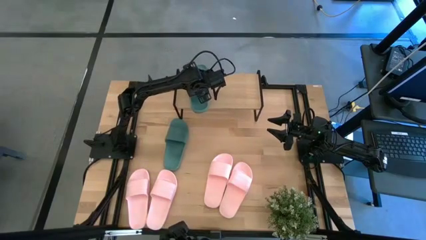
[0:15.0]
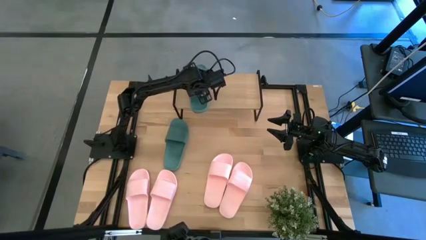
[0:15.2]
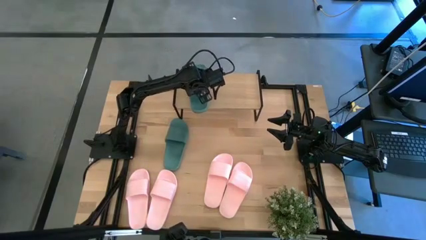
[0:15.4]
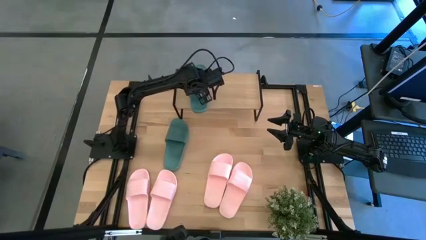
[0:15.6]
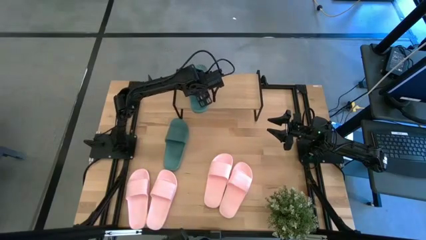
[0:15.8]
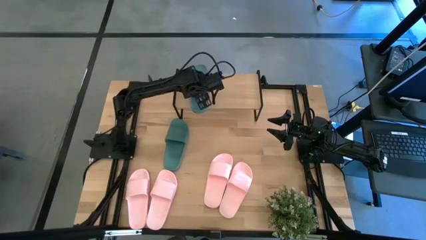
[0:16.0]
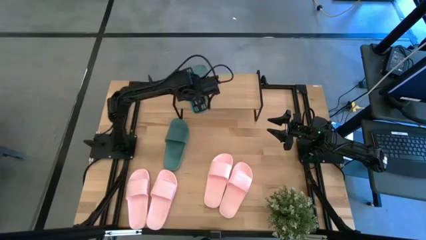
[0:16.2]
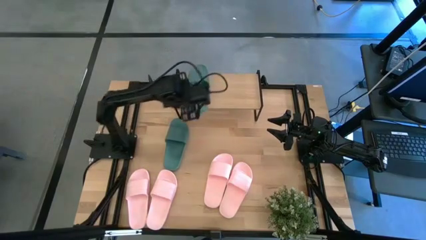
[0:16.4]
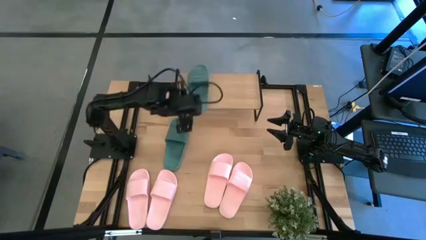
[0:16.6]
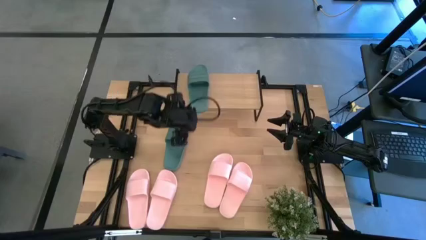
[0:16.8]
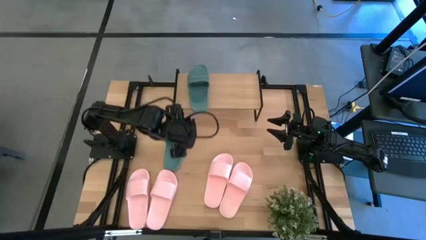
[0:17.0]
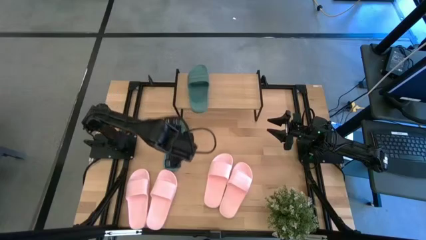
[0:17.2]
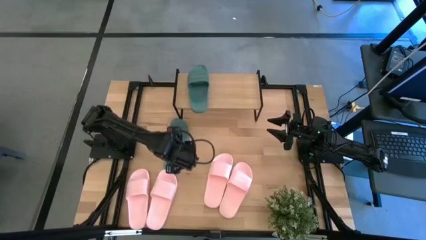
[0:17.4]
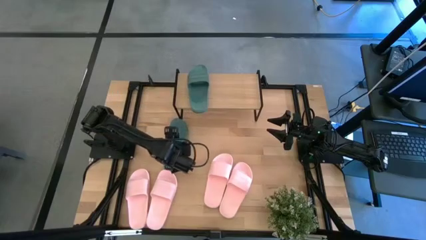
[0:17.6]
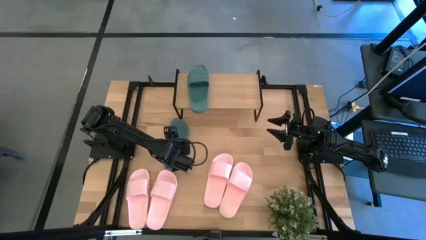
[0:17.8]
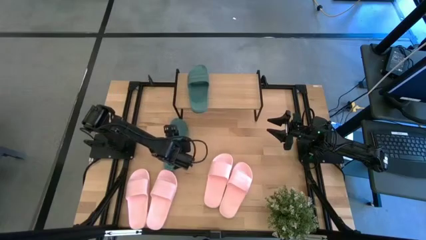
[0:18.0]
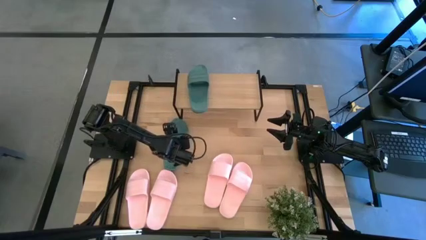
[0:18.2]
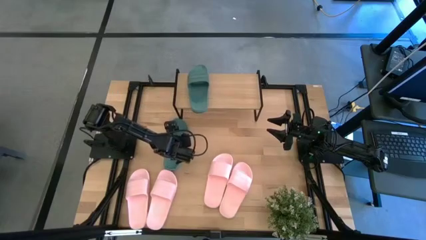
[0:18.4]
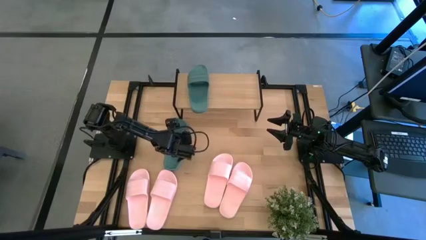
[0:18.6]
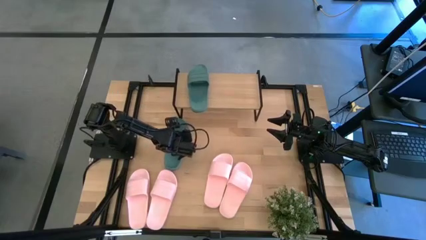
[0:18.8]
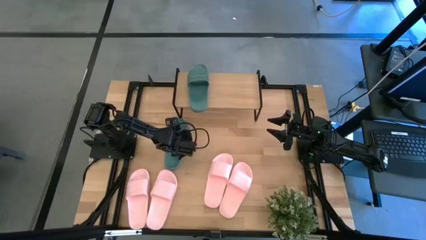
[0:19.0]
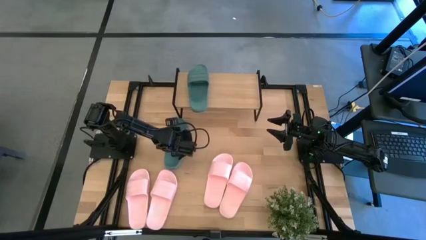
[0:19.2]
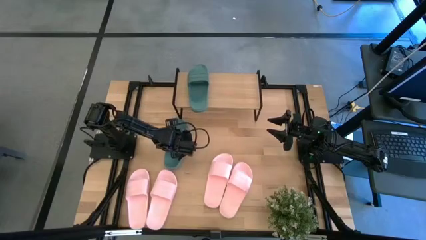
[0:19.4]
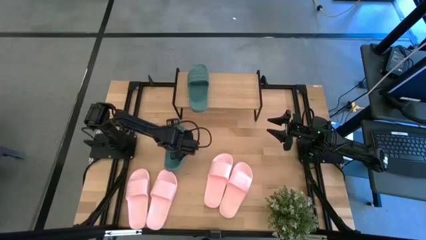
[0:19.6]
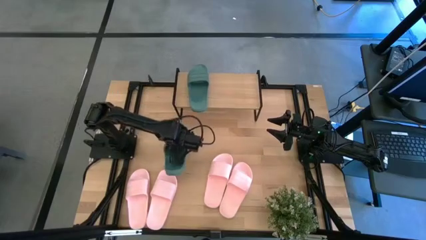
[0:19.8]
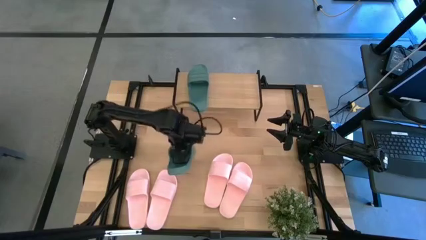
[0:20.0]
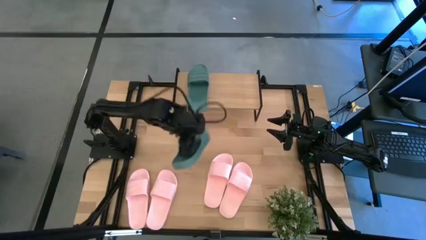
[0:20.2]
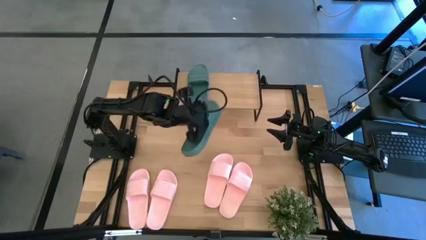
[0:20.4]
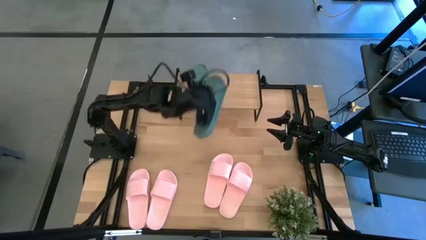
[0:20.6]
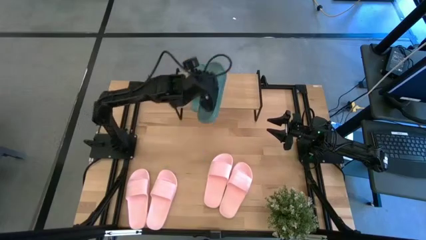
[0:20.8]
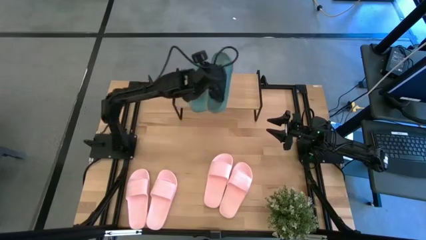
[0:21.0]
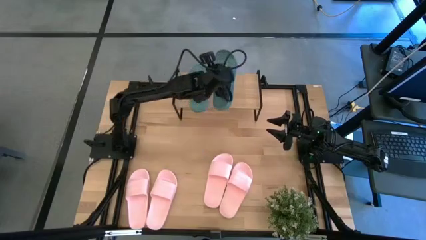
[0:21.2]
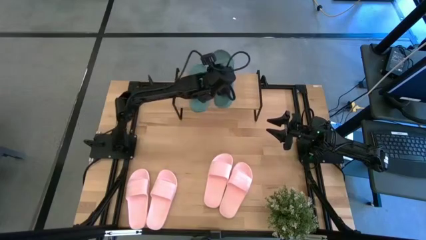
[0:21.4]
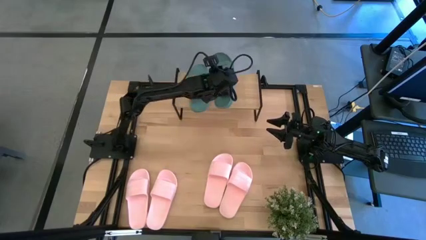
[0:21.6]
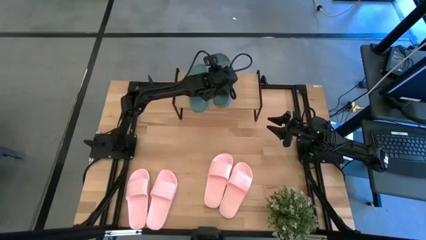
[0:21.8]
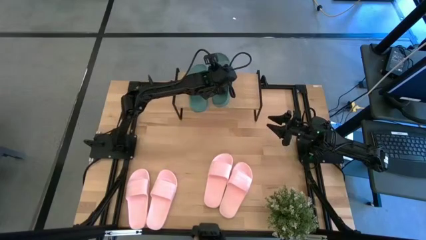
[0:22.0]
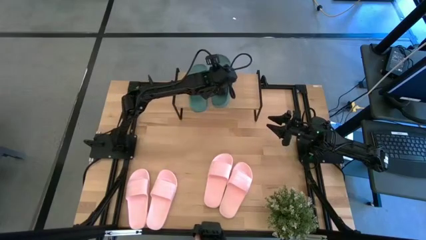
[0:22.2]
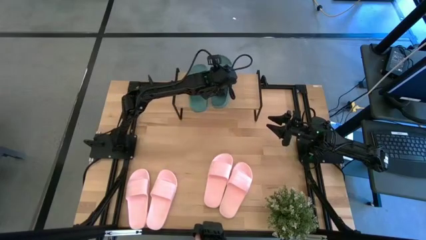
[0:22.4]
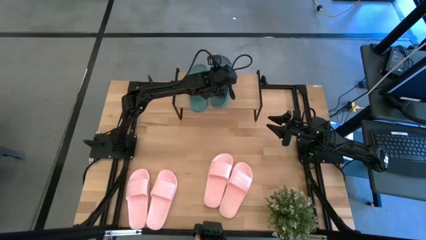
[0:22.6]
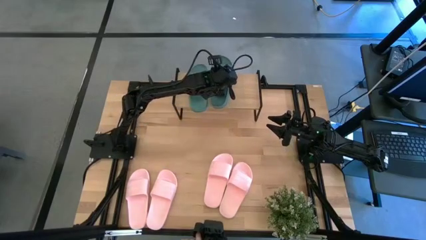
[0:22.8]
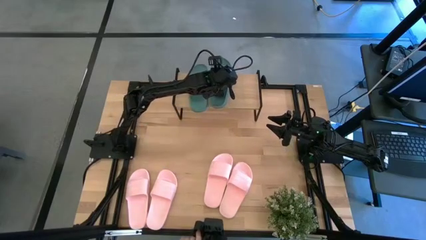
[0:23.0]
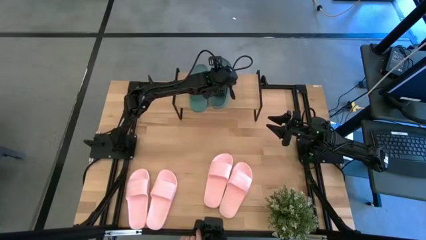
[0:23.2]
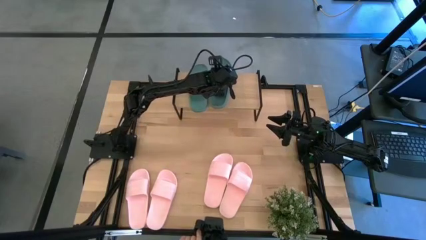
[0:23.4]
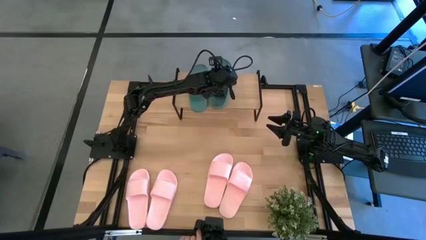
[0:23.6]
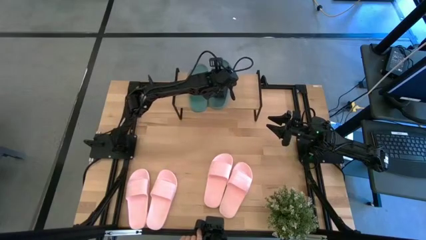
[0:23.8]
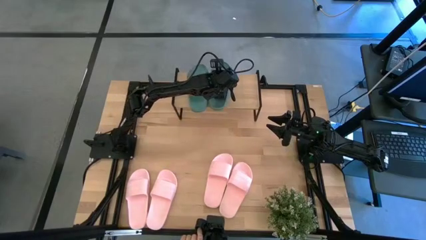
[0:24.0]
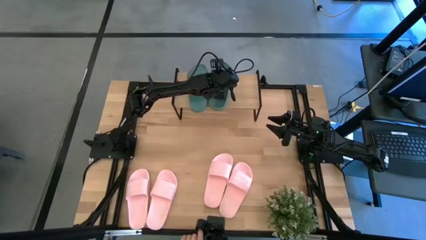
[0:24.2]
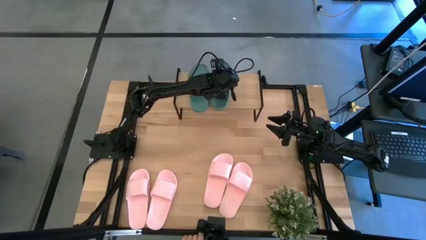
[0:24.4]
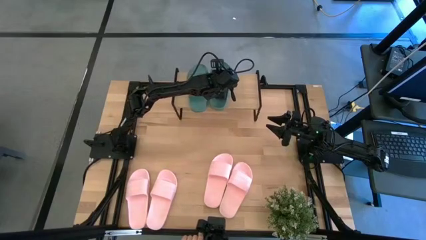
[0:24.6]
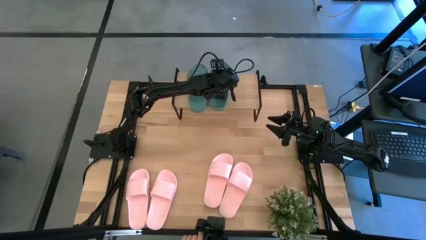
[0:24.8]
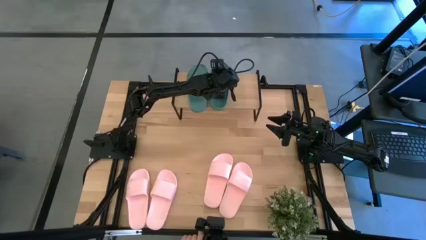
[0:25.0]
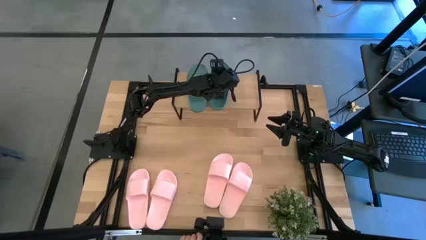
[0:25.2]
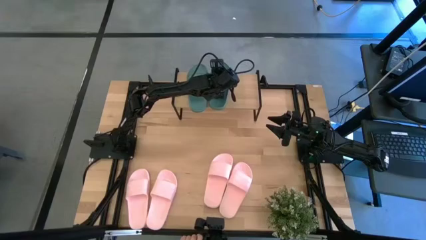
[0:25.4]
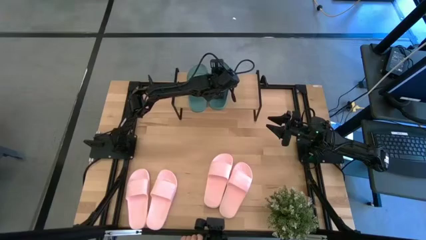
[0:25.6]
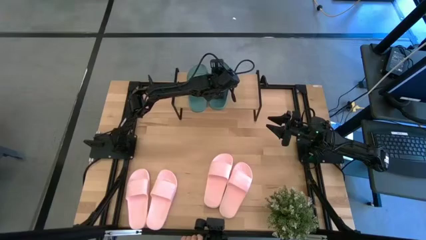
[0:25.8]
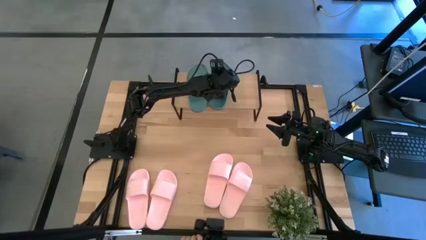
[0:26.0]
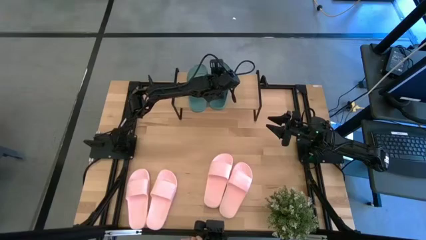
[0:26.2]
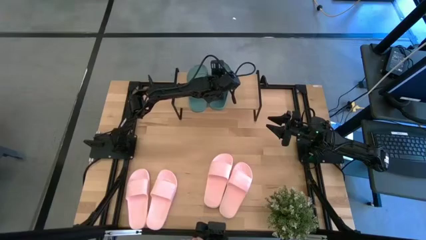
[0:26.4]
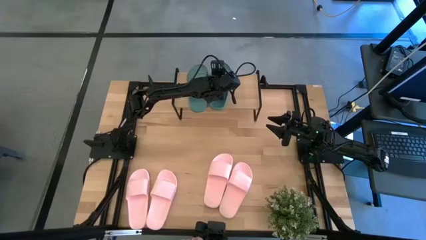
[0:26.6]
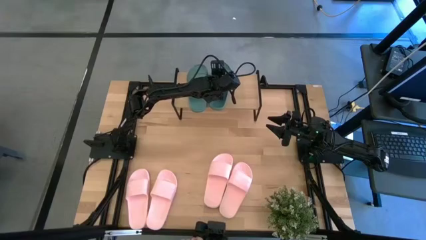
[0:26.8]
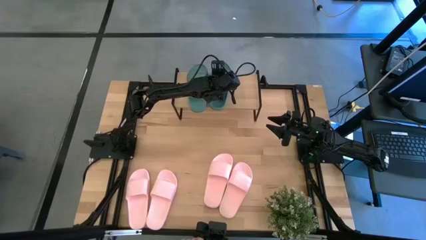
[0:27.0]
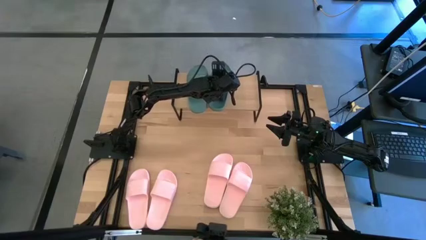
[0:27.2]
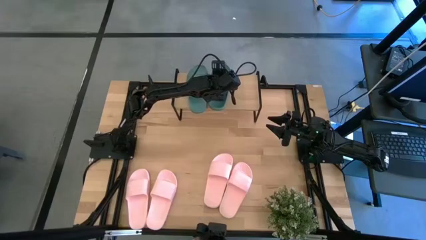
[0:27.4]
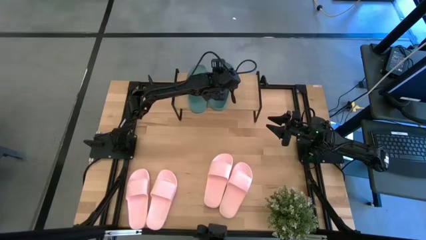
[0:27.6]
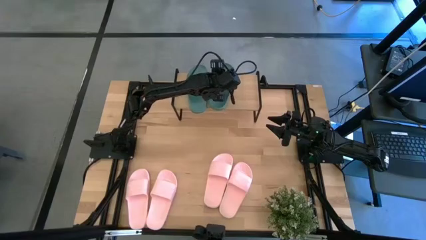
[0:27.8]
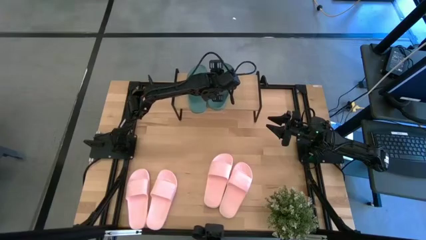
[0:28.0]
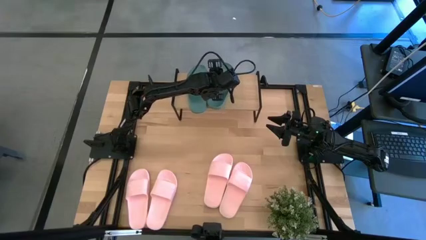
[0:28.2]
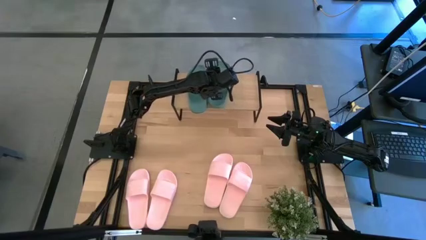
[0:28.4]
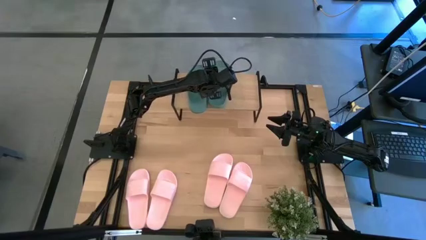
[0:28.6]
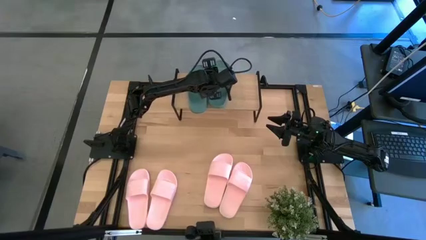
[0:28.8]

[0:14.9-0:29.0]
Task: Pick and place slides into the shelf
Put the green slide on the shelf

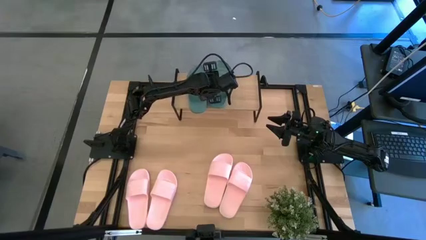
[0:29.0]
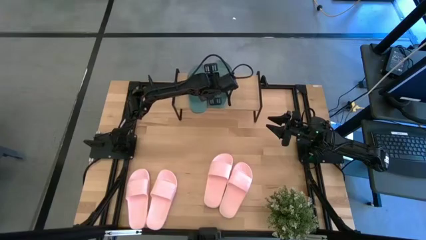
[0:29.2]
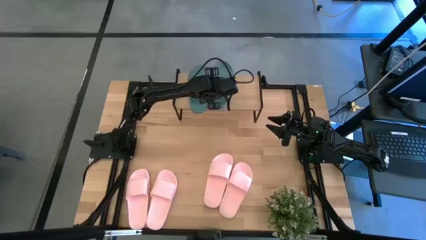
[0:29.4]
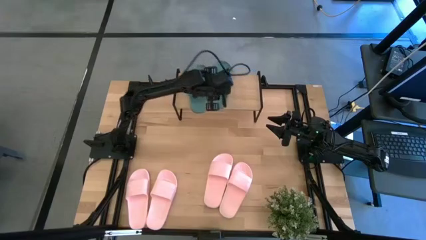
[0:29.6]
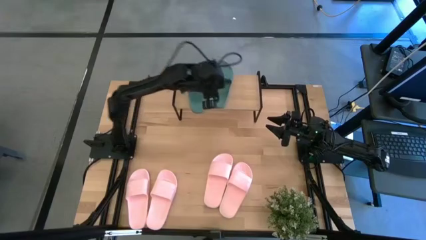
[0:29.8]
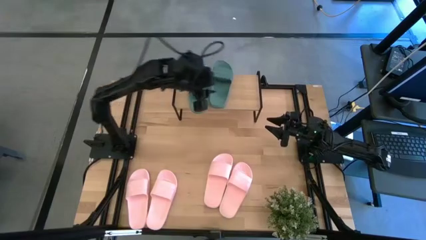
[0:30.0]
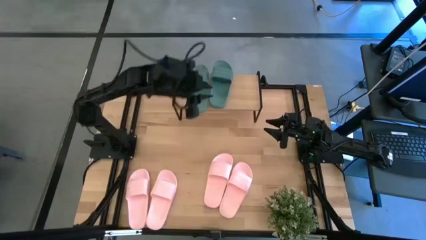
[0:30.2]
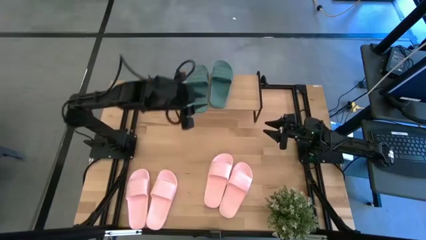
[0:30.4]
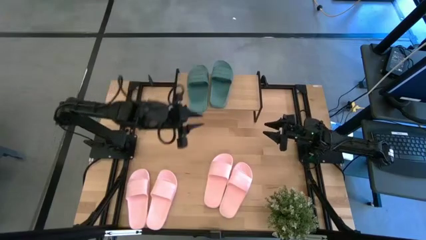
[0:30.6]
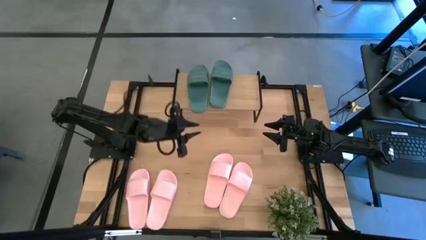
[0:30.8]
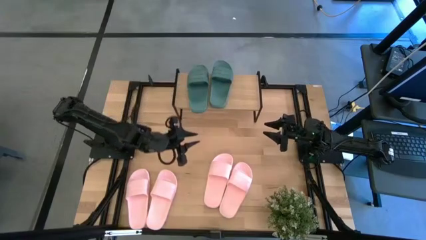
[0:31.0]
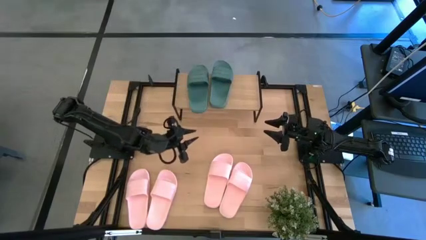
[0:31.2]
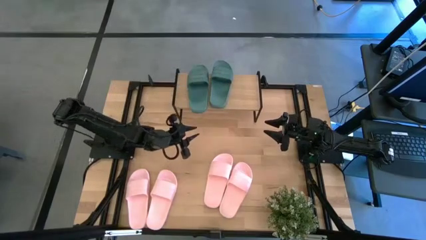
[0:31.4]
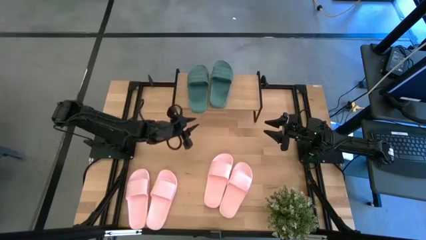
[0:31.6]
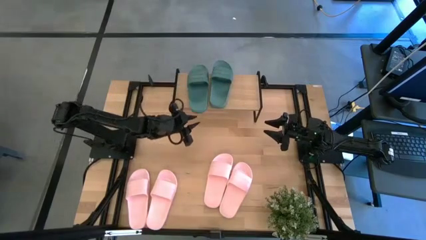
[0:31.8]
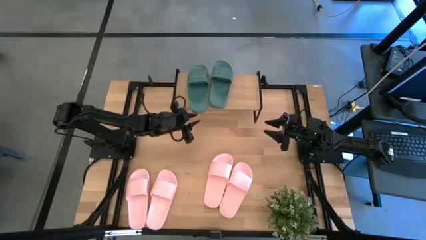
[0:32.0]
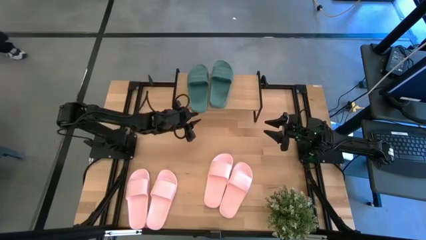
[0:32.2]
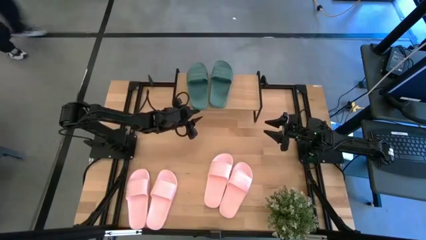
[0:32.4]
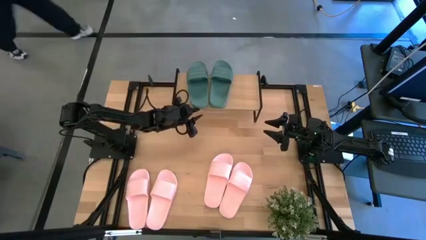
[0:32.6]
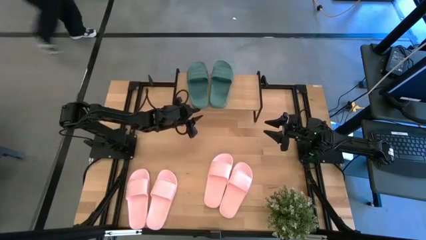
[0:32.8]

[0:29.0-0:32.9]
Adjust the green slide on the shelf
